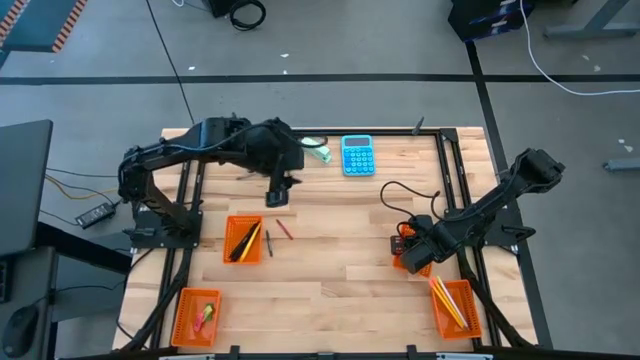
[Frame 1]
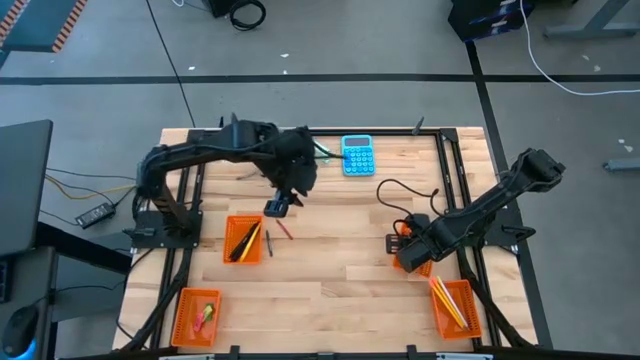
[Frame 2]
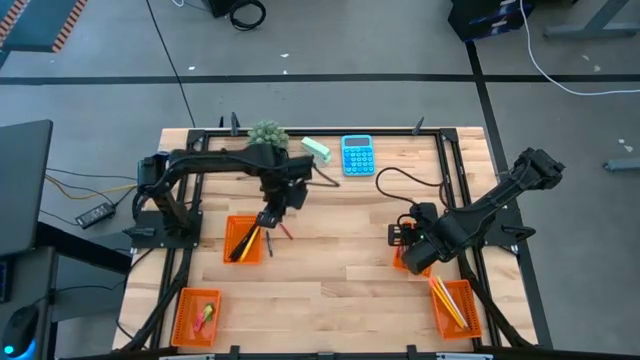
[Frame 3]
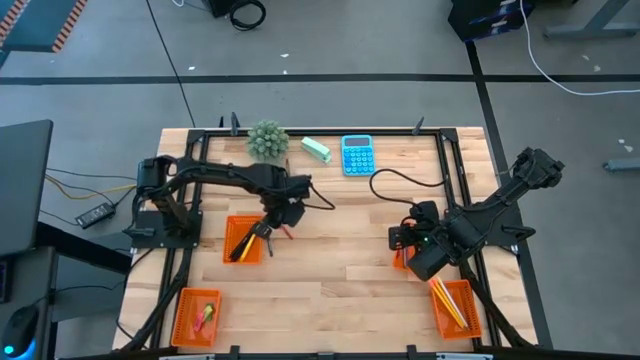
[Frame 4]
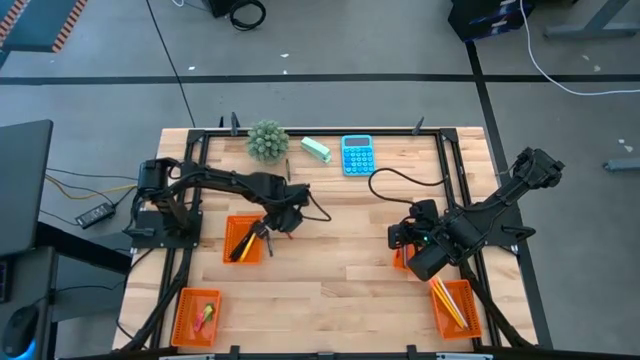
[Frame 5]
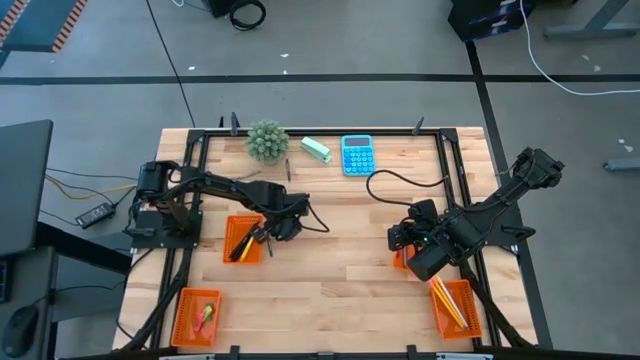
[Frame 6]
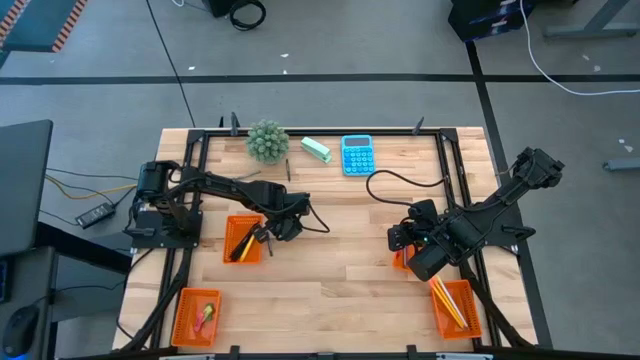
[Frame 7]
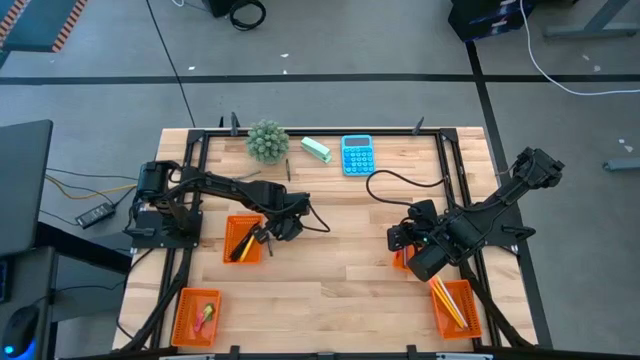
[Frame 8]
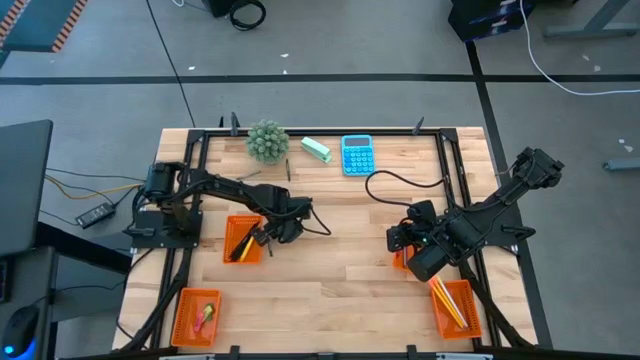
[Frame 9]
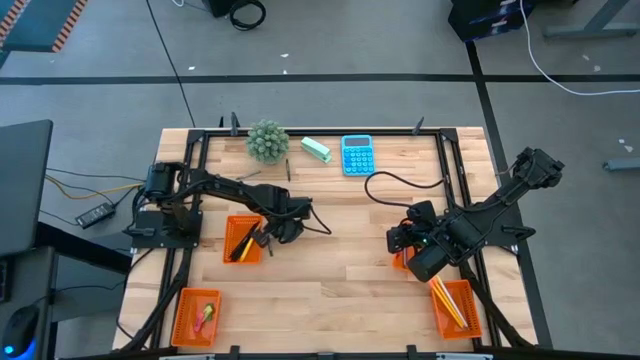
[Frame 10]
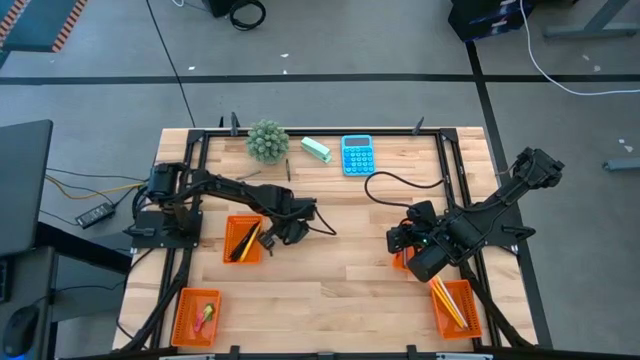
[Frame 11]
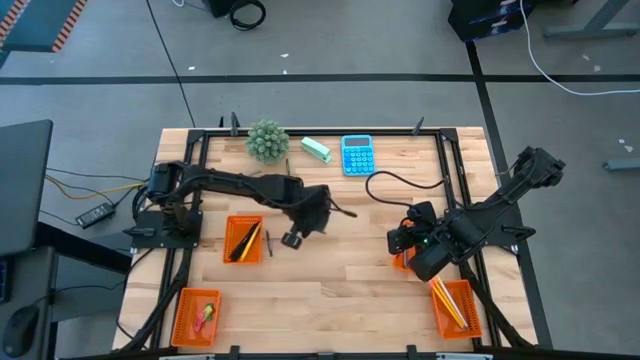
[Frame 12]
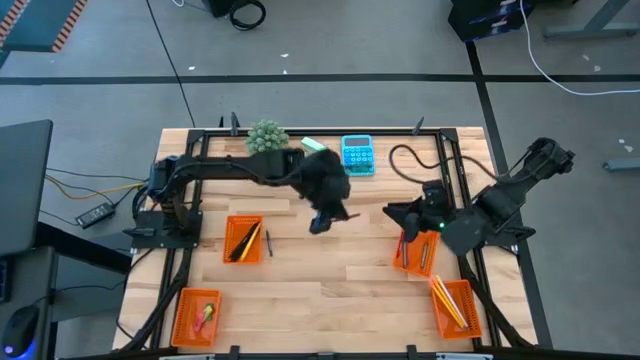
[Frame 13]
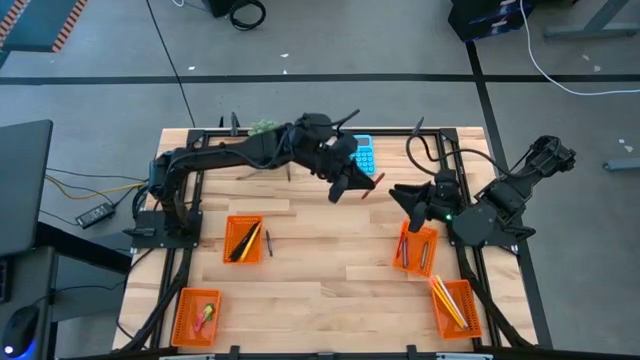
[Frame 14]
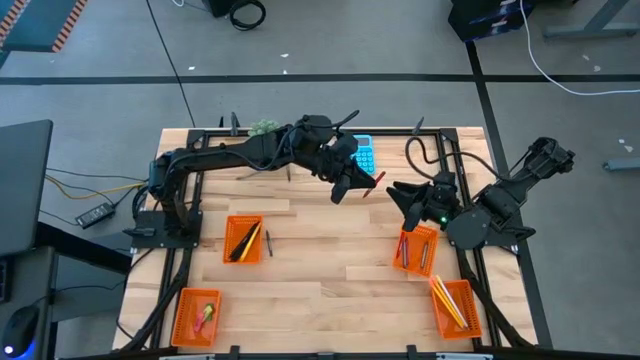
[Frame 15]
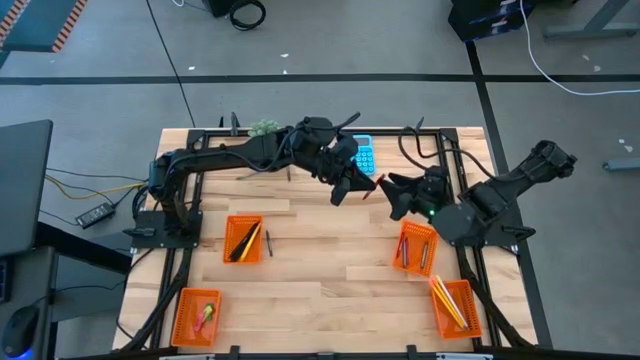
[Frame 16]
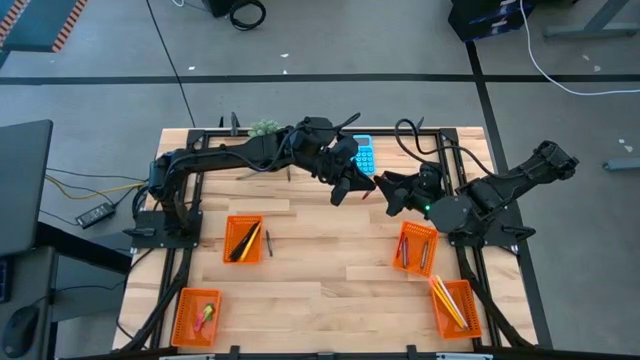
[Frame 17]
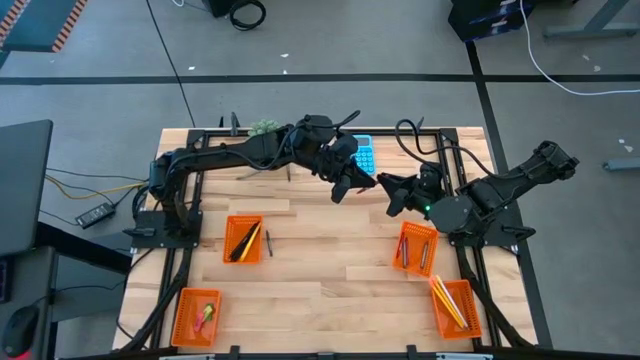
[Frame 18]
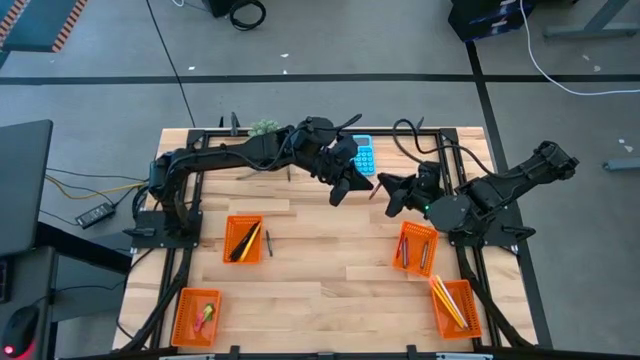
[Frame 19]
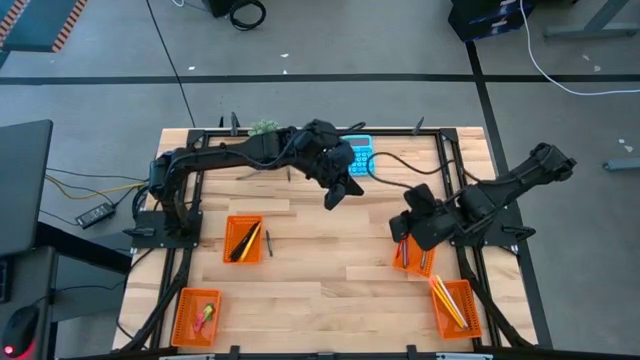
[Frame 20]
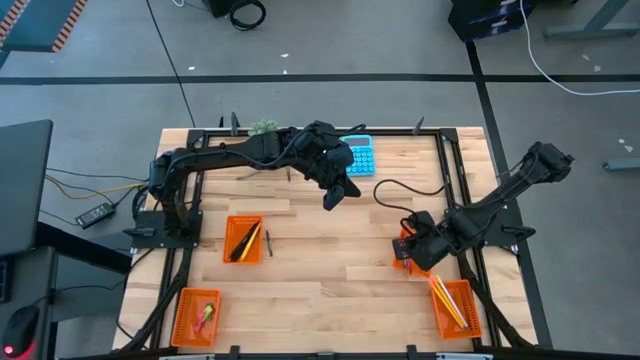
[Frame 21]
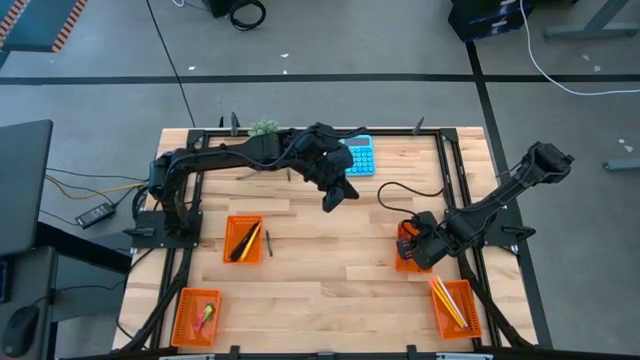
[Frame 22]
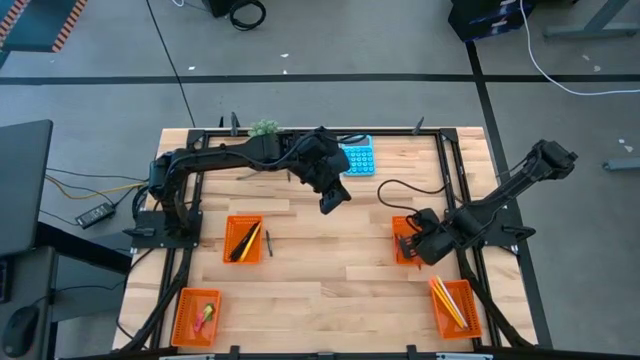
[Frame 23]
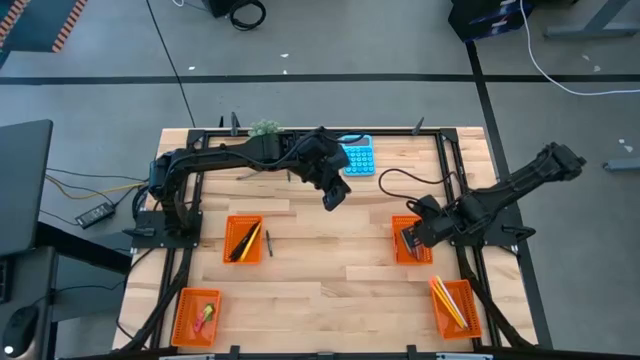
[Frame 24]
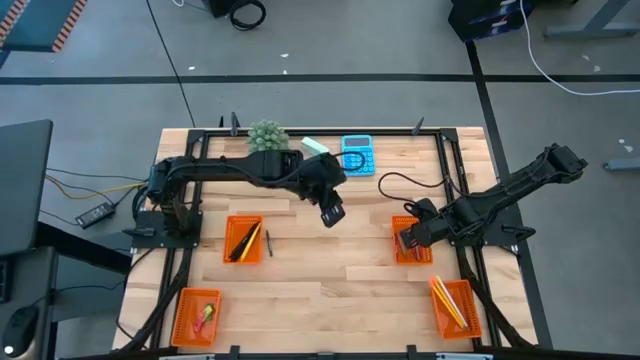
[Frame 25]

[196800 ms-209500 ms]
Task: Sort crayons/erasers/pens/pencils in bins
Put the red crayon into the top right orange basket

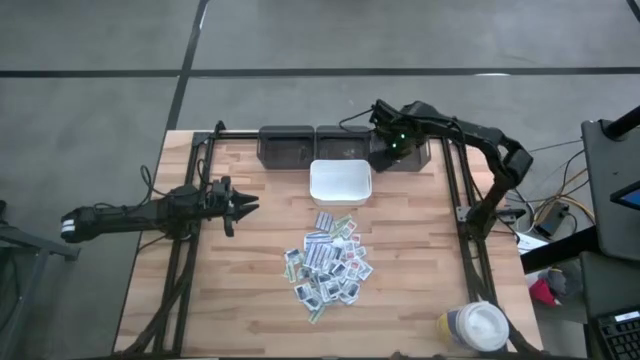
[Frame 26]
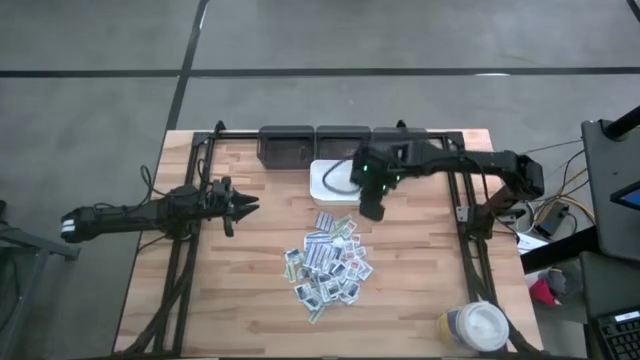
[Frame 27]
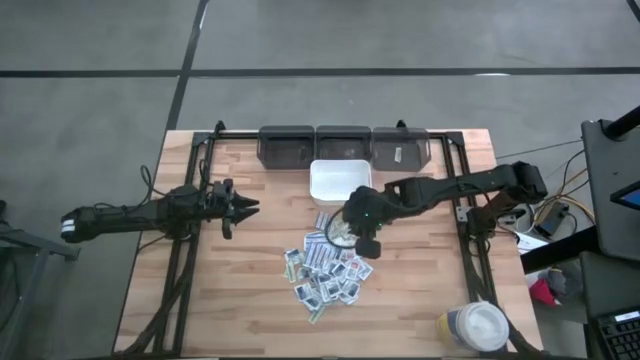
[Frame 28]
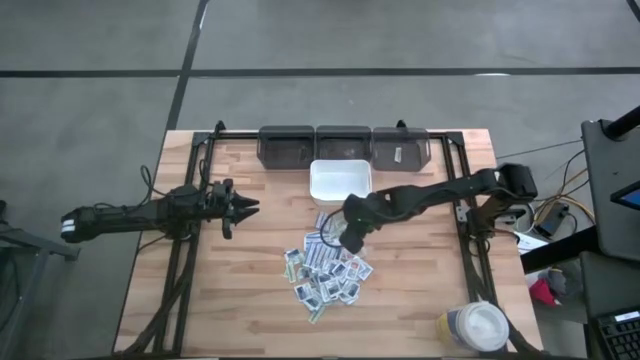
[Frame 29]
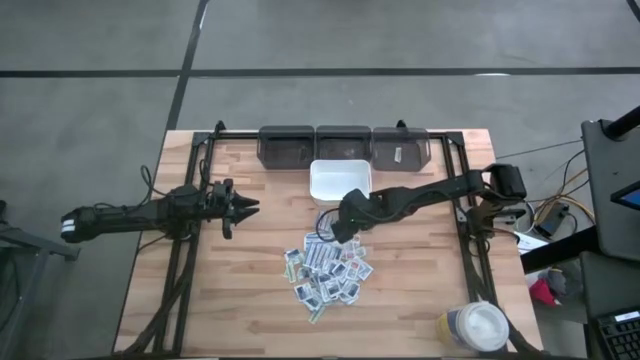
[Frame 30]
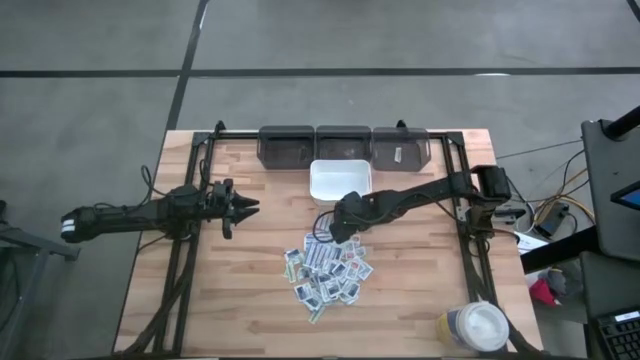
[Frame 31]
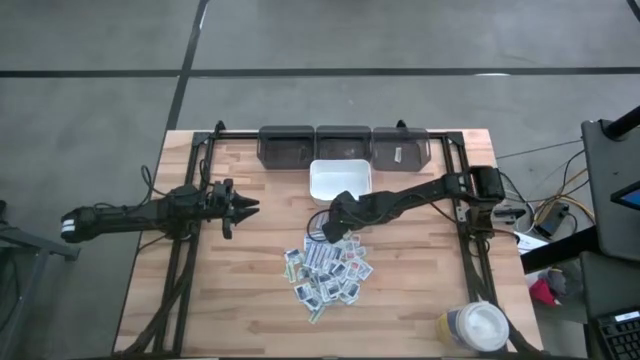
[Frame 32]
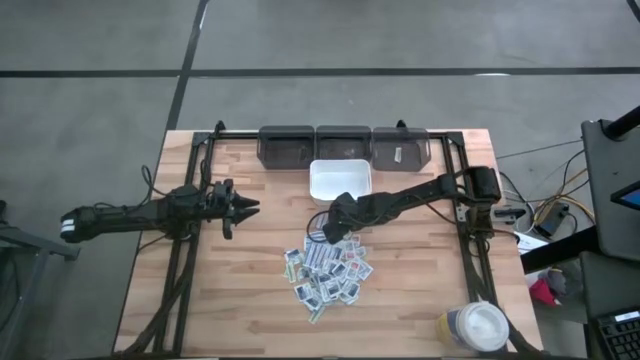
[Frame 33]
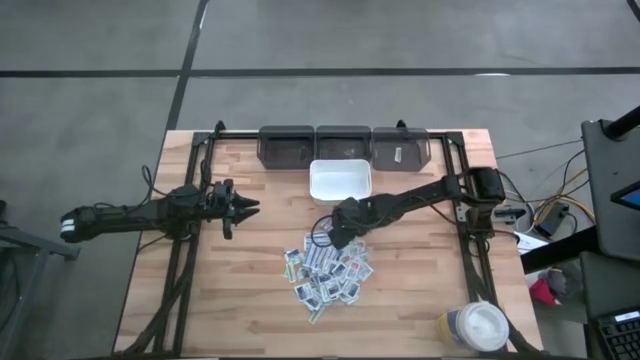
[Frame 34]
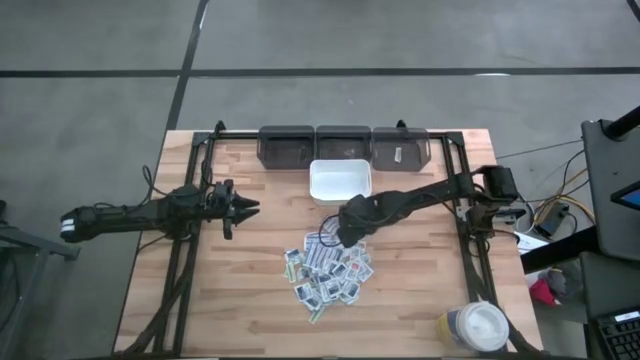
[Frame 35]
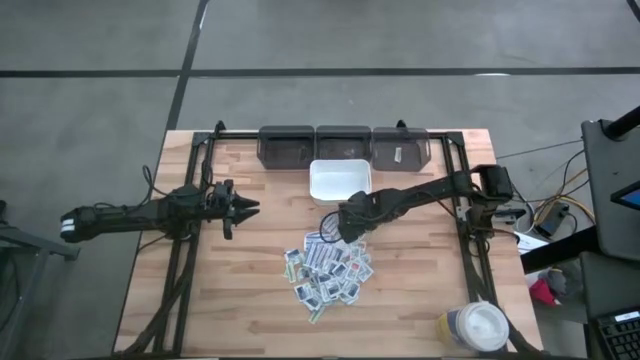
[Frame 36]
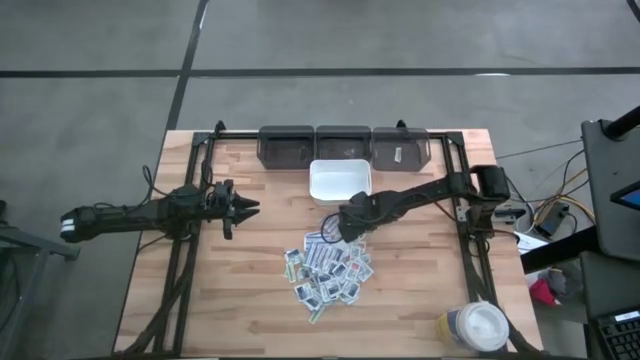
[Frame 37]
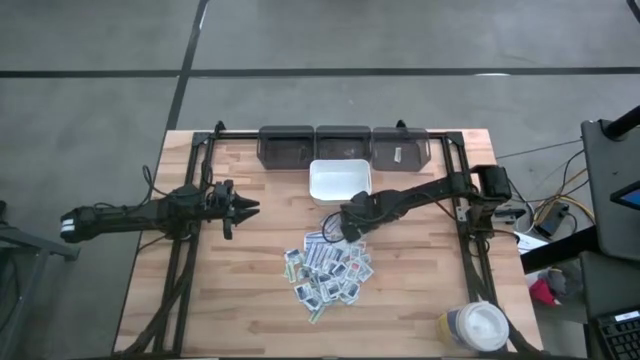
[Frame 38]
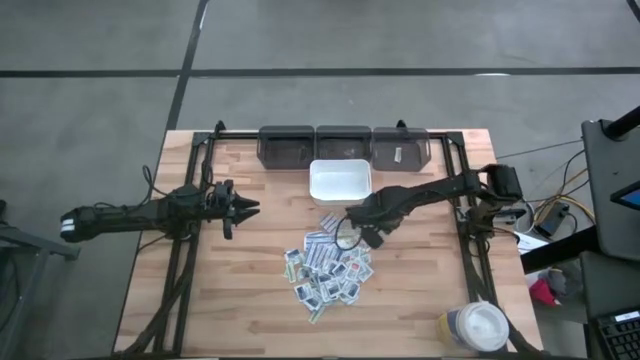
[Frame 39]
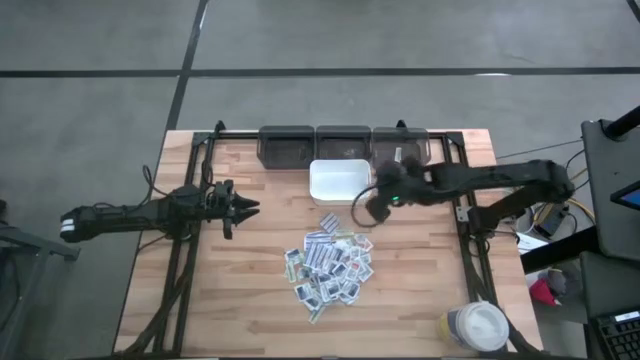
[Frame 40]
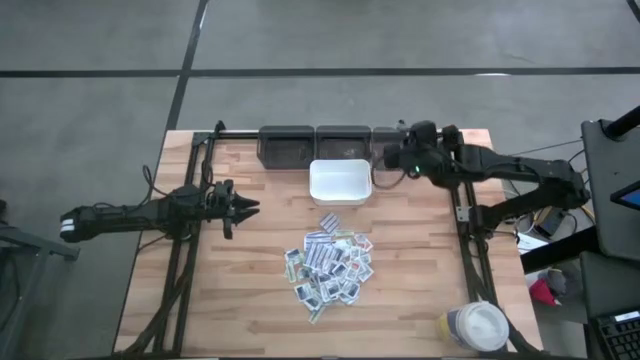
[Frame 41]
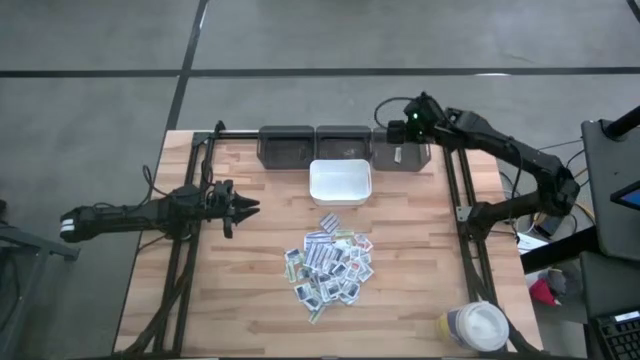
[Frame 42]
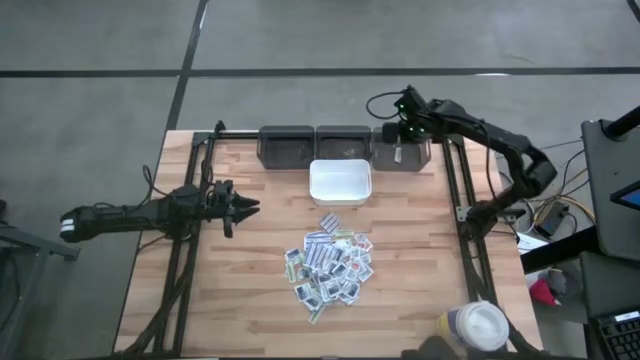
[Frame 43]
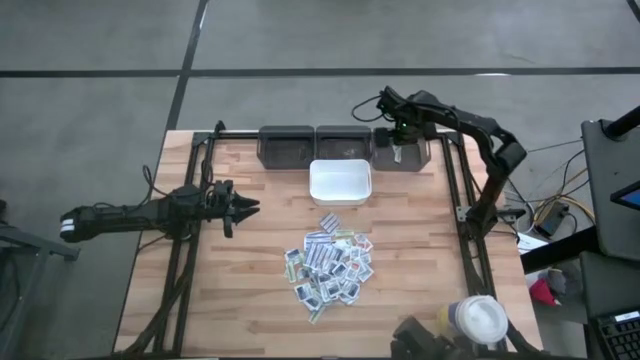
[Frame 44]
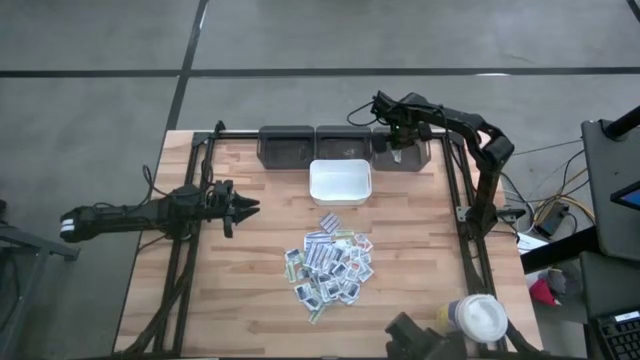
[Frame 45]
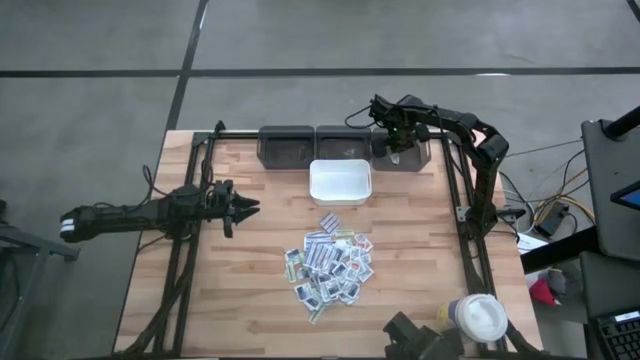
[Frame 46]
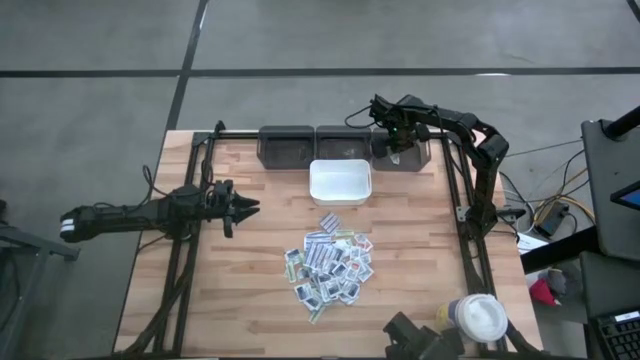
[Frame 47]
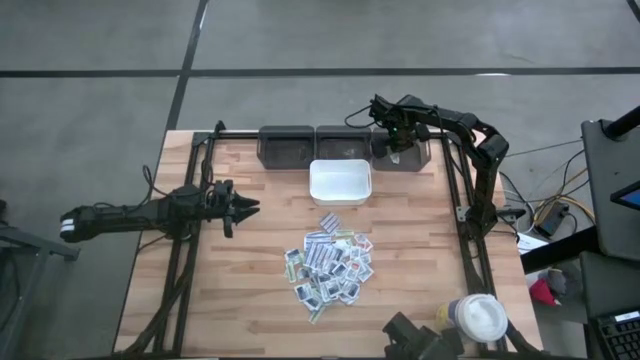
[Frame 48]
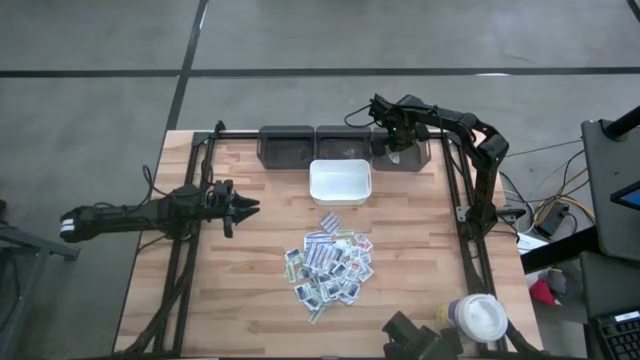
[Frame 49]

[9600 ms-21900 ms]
Task: Pick & Place First Aid Supplies
Put the green bandage pack into the right gray bin
